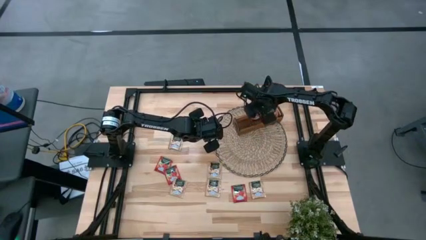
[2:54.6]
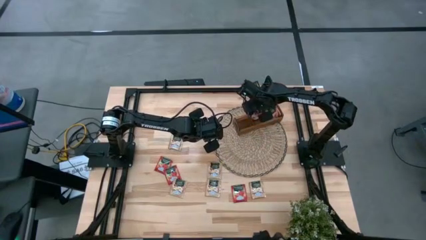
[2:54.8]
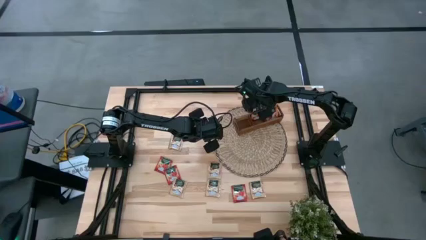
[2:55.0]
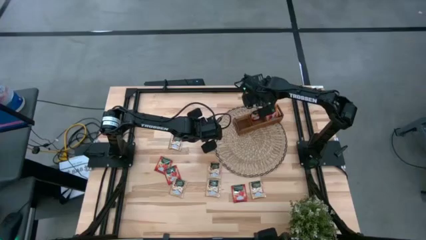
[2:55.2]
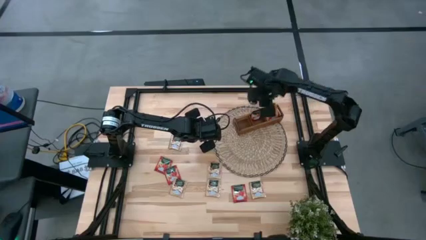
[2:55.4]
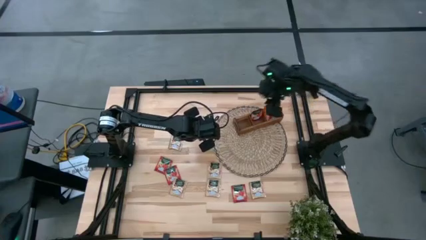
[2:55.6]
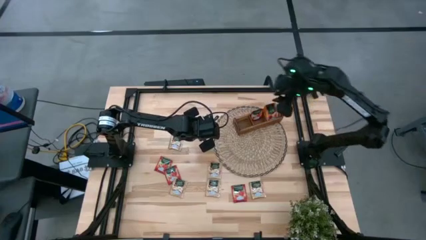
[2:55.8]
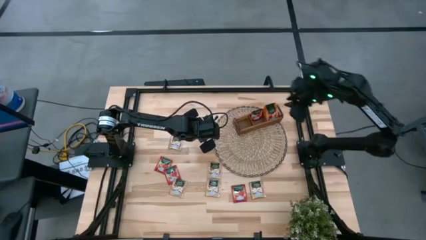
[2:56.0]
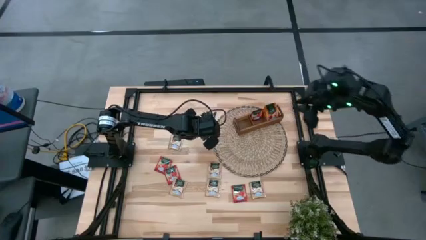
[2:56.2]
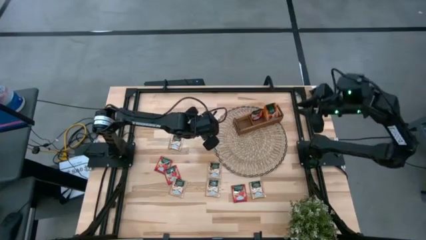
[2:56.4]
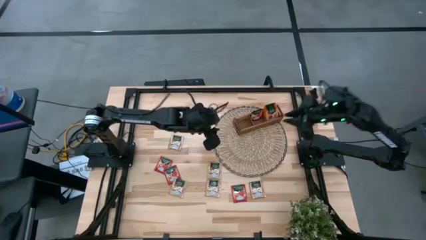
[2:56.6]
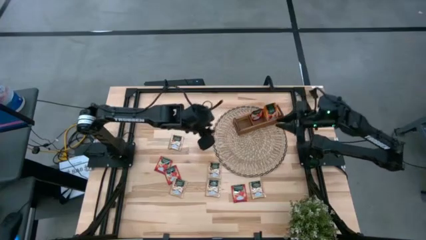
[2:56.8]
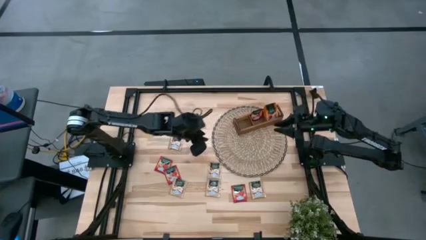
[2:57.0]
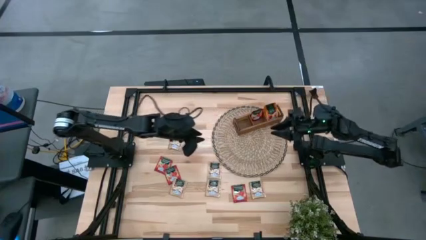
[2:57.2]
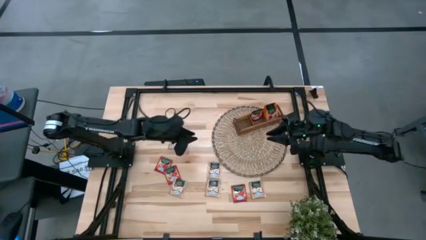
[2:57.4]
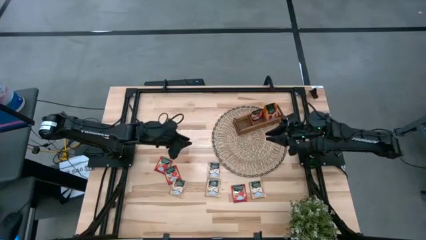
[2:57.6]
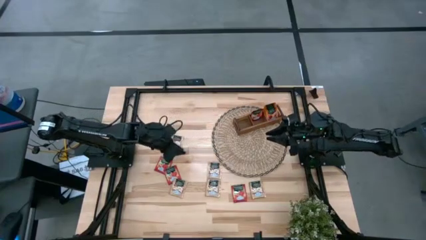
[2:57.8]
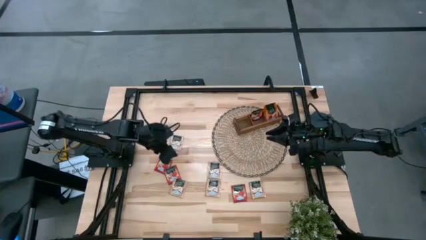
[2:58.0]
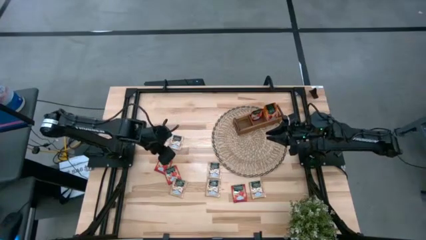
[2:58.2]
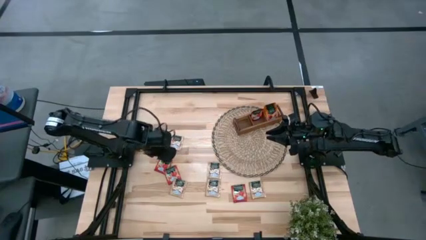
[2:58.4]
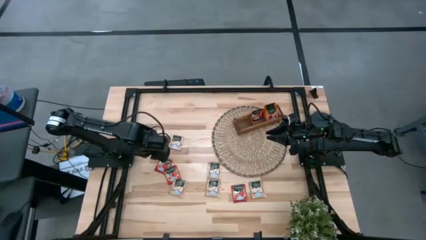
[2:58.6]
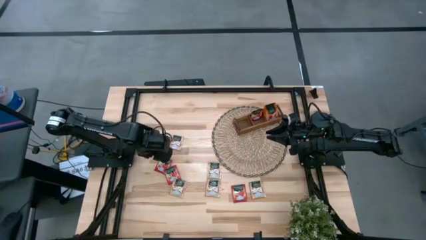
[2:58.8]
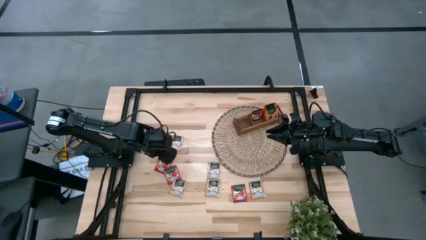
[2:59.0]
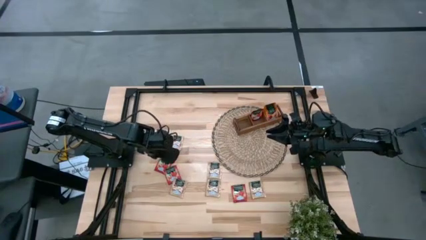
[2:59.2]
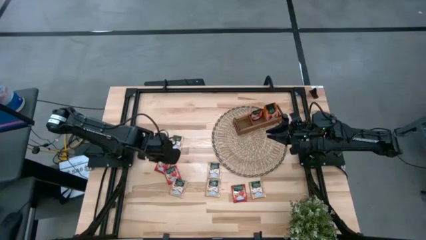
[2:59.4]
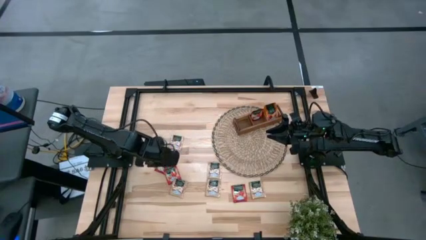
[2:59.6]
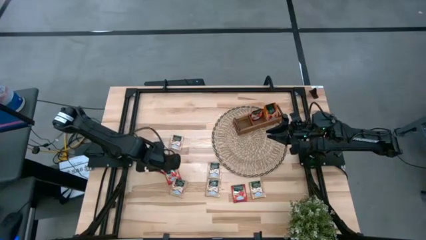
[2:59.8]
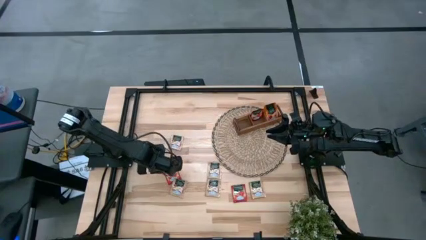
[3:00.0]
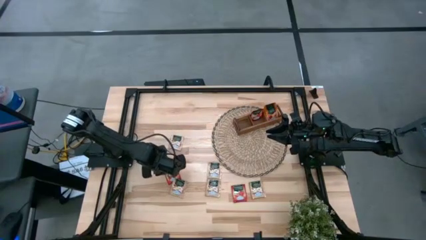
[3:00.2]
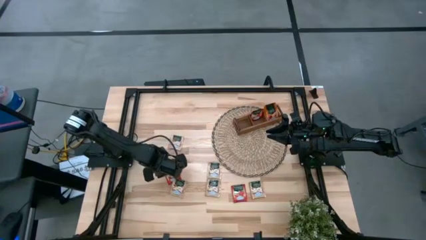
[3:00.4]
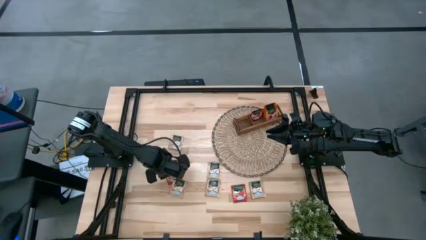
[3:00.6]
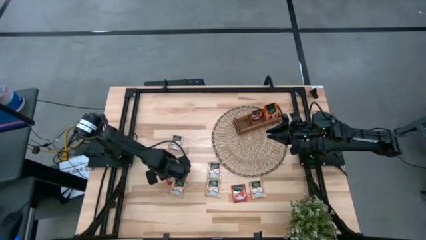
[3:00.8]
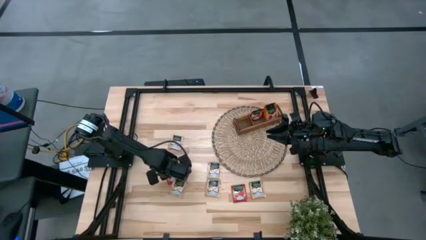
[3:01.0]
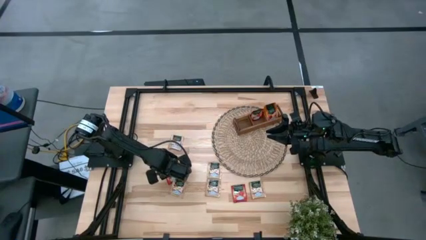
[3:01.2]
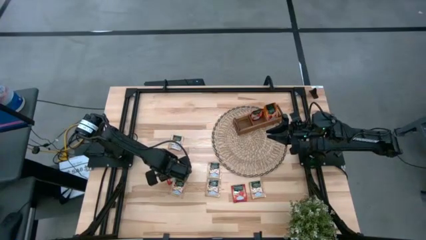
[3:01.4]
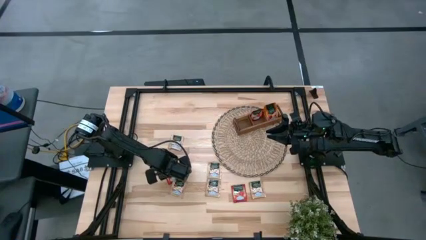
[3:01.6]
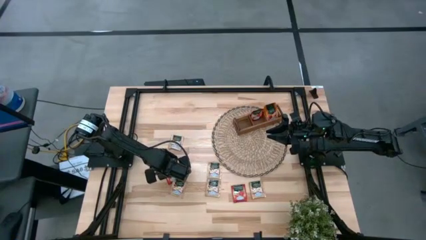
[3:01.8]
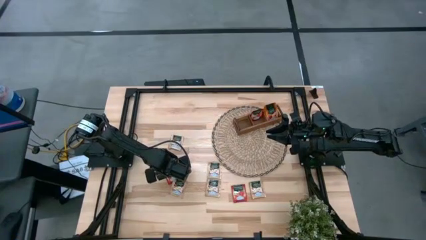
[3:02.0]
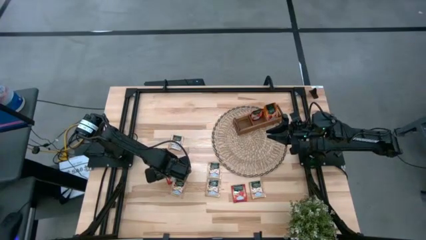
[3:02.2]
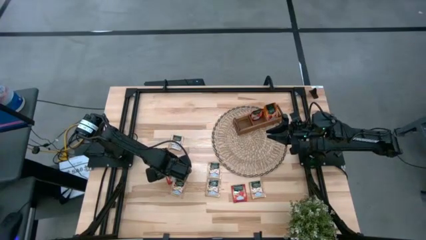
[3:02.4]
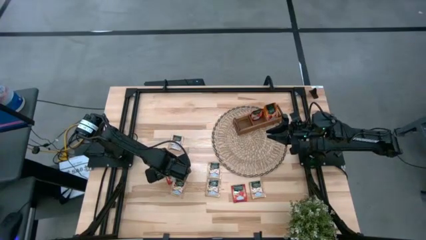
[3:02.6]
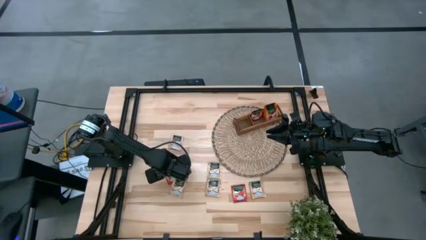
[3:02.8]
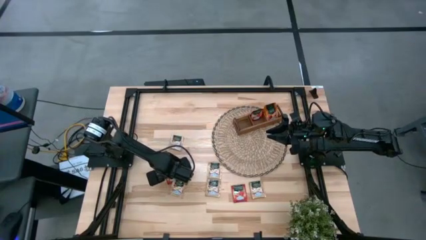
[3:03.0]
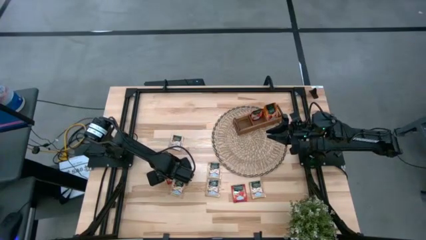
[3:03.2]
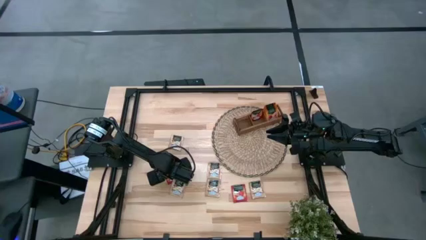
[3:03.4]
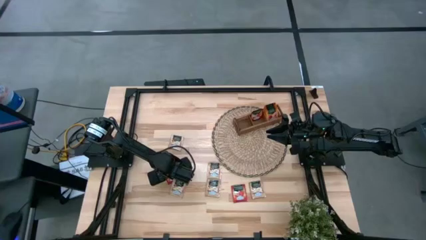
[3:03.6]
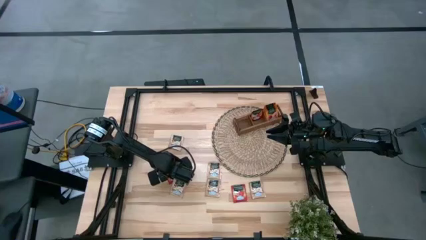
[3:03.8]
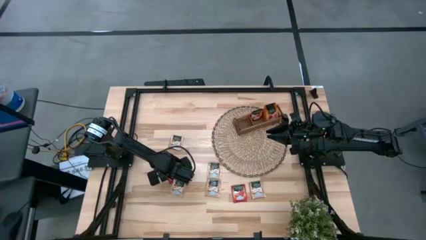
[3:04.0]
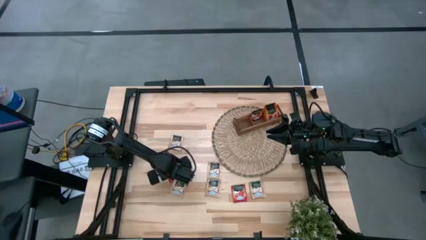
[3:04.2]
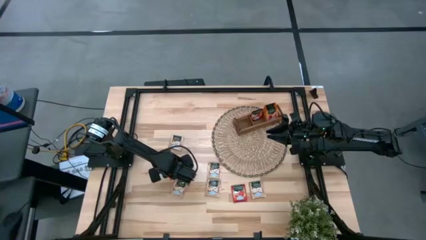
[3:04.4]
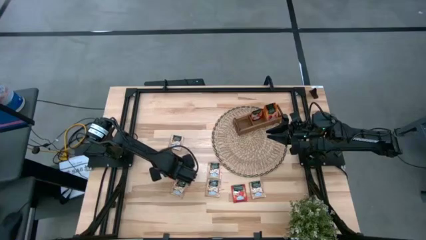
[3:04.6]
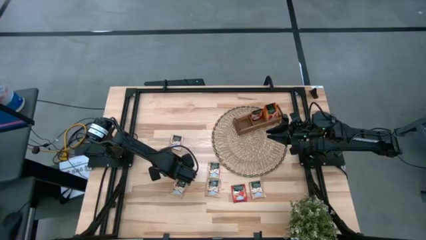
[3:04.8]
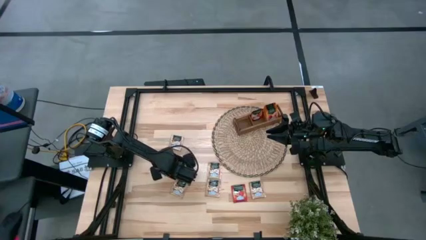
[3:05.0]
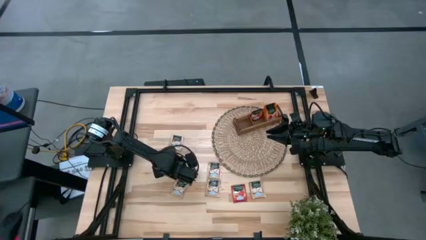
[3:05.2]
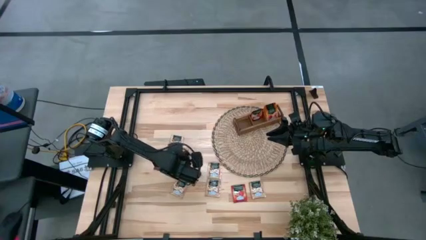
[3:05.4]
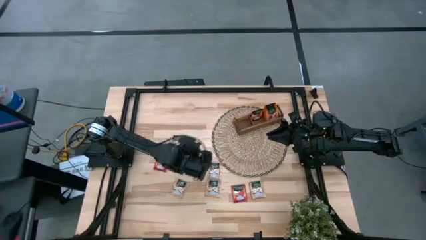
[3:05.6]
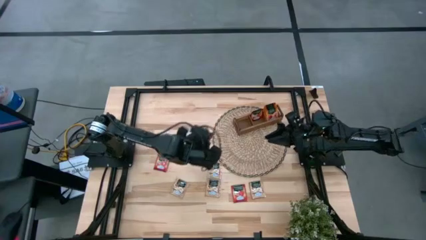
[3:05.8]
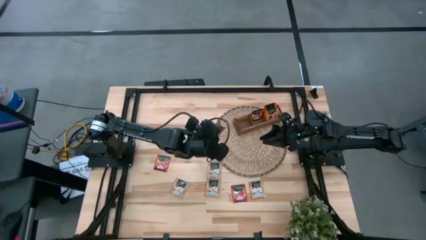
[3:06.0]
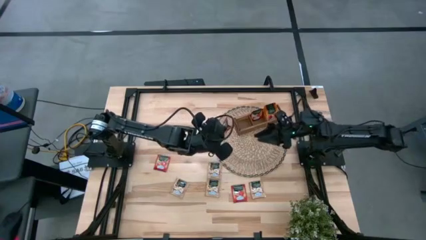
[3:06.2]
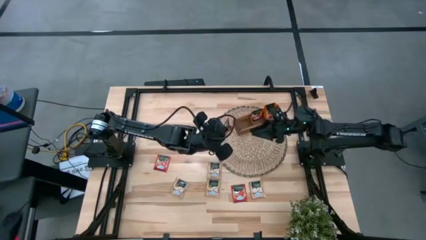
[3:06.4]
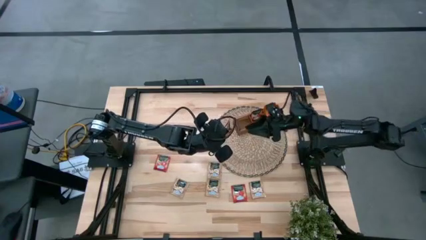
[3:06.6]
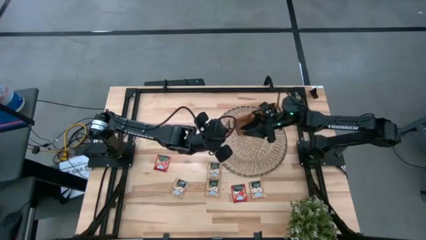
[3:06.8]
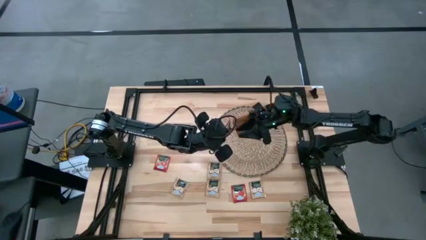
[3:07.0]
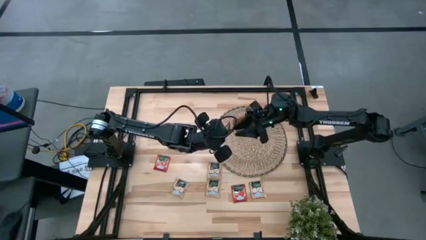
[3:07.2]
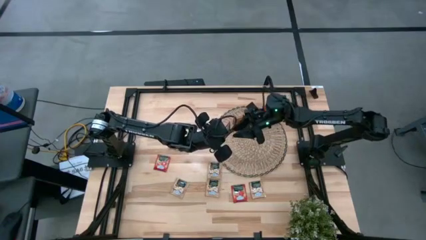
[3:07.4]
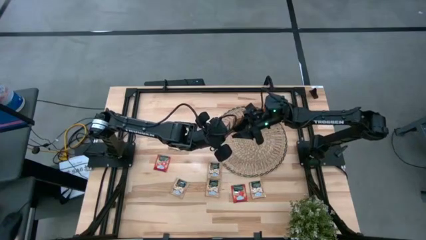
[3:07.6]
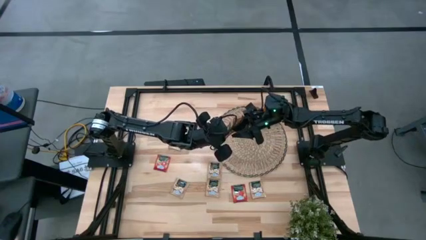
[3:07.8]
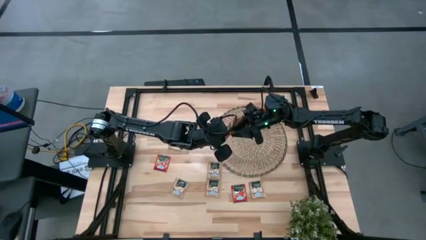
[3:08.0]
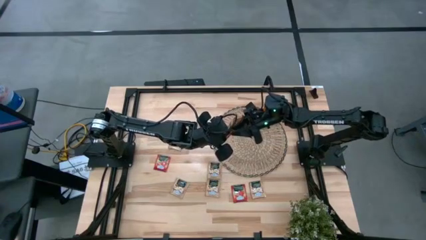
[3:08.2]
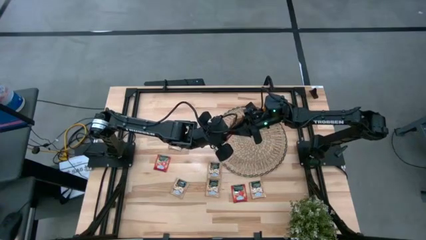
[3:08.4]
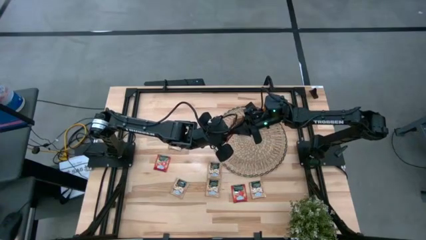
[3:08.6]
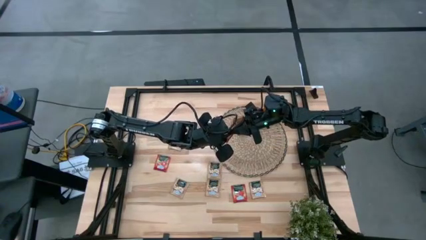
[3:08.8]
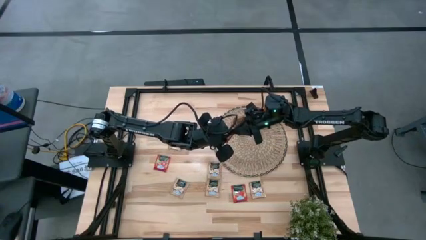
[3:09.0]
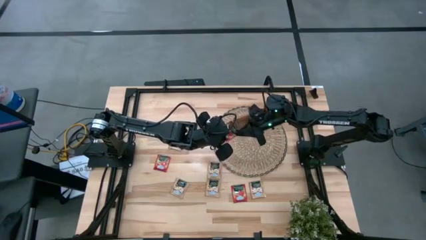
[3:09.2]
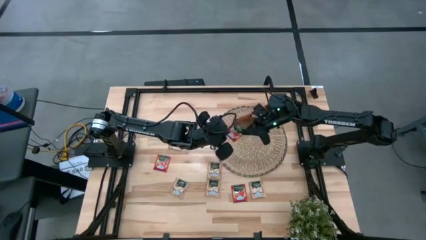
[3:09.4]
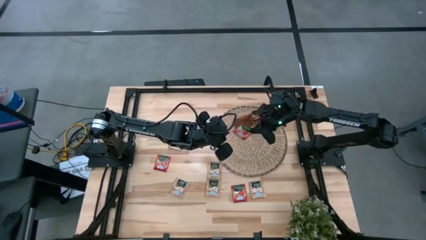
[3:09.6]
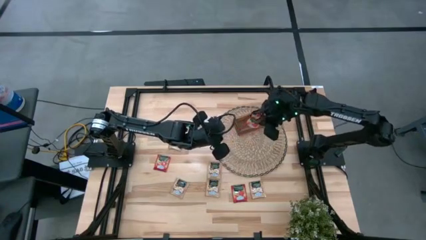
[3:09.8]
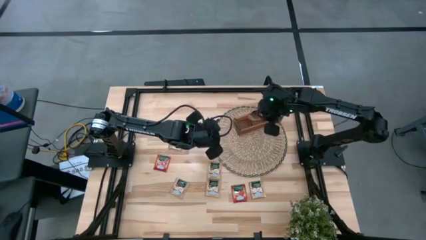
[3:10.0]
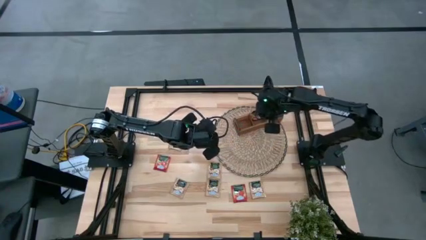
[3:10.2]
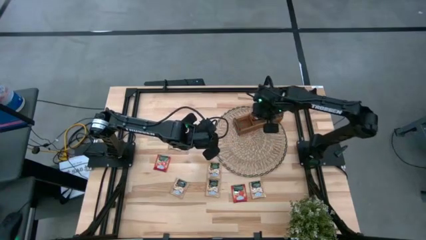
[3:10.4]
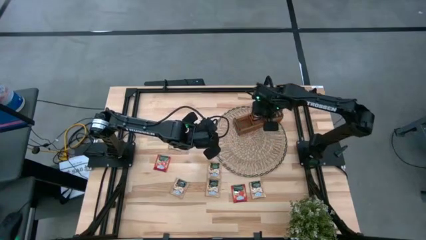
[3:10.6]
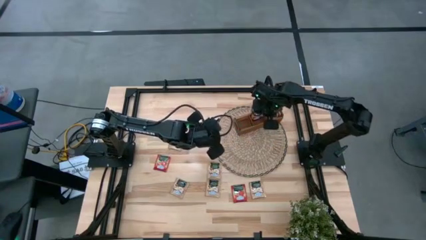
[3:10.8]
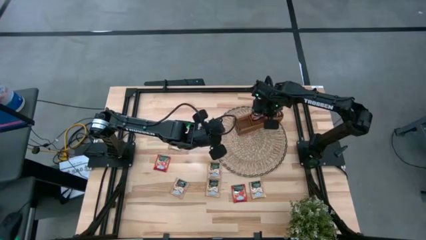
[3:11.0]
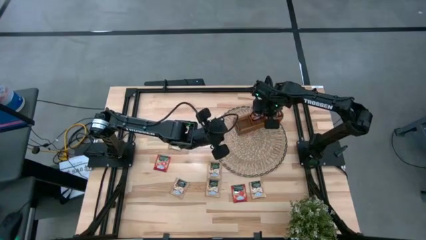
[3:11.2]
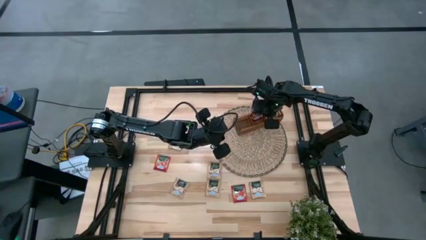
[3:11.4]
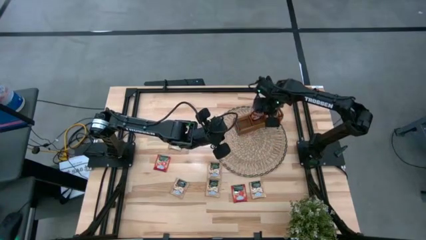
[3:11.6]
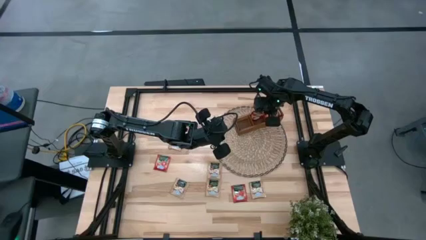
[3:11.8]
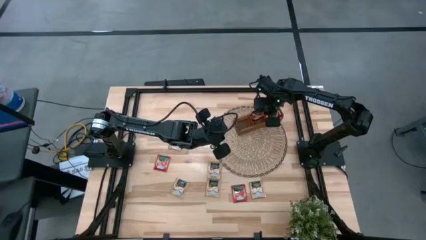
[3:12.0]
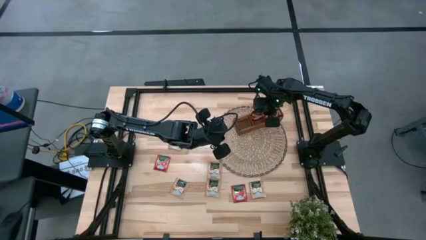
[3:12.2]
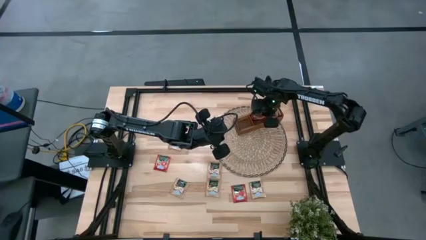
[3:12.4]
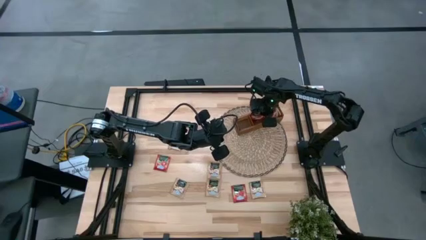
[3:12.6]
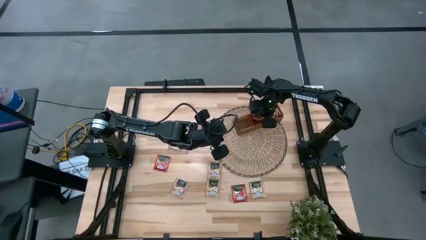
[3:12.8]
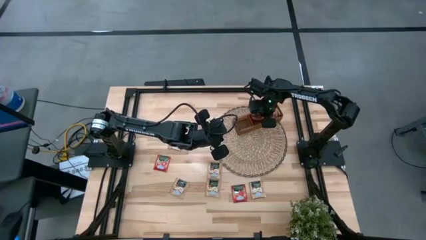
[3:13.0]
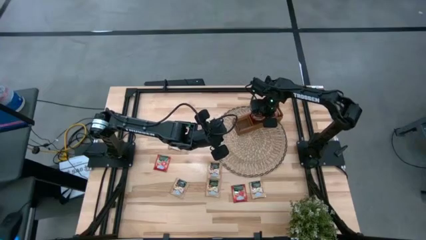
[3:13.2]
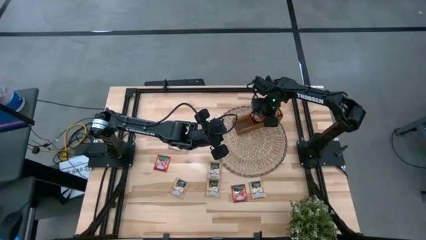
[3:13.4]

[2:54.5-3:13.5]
Task: Pick & Place Tea
Put the red tea pack into the middle compartment of the brown organizer
